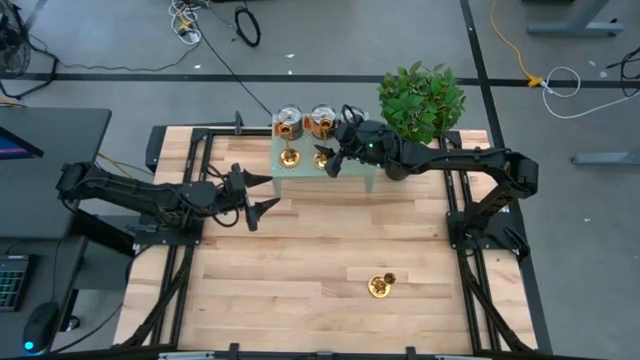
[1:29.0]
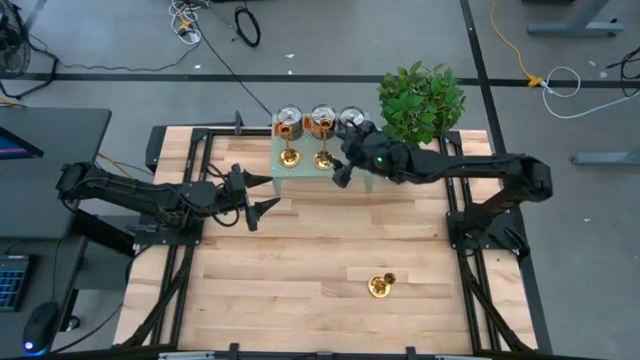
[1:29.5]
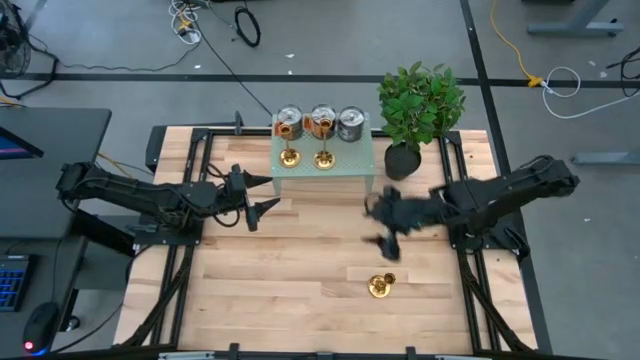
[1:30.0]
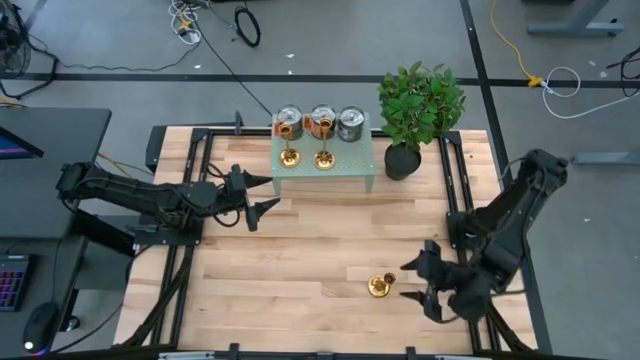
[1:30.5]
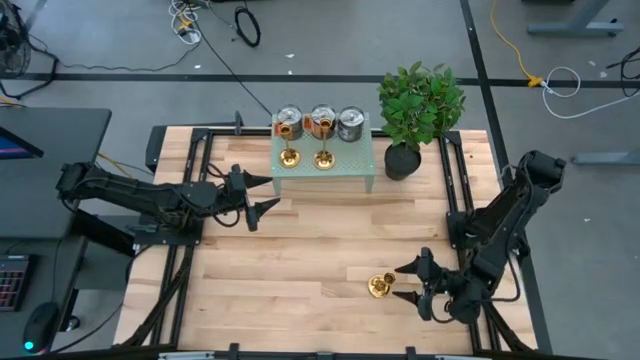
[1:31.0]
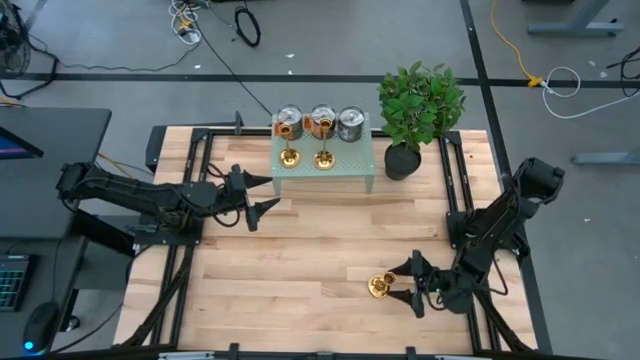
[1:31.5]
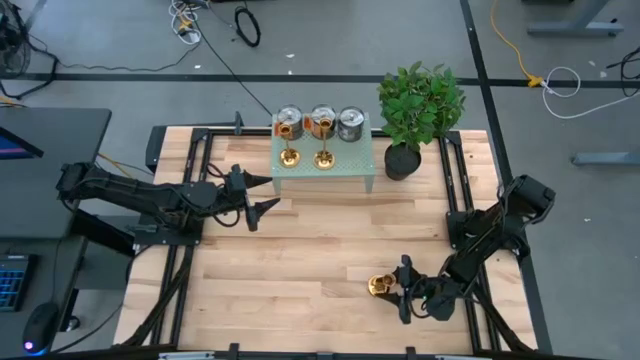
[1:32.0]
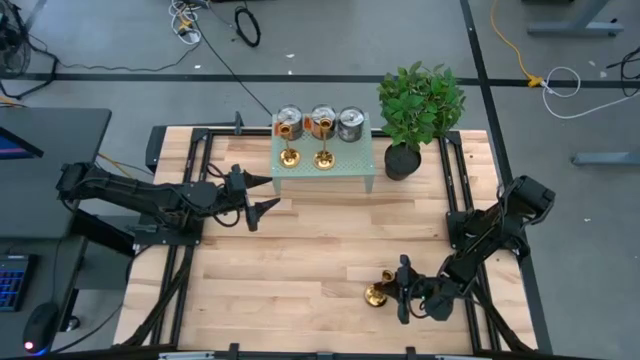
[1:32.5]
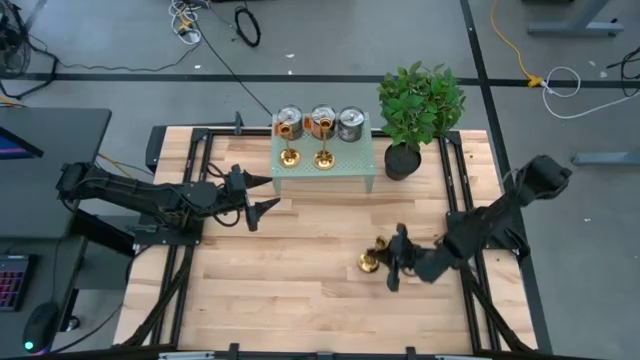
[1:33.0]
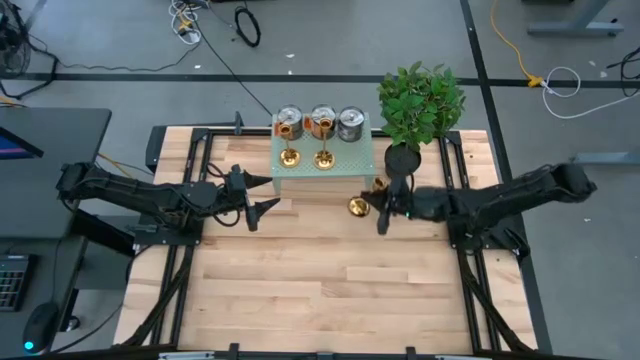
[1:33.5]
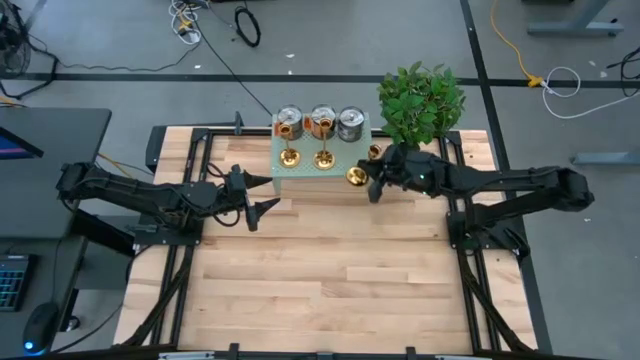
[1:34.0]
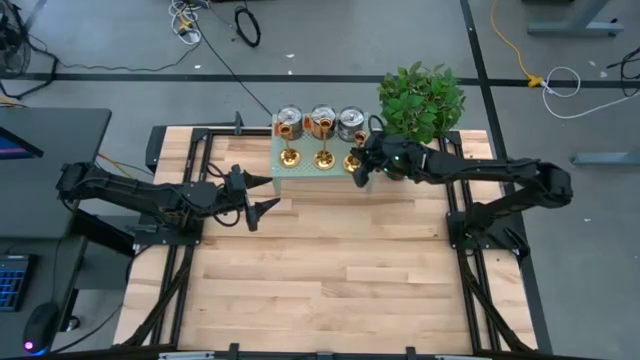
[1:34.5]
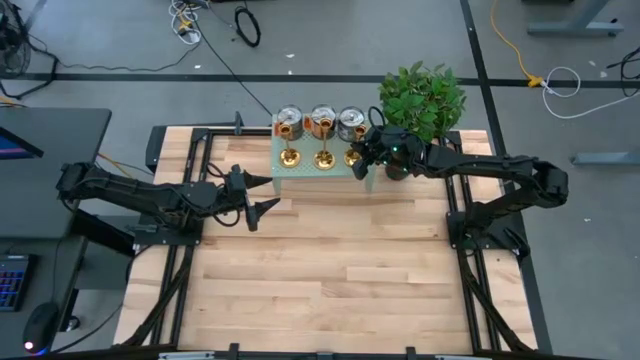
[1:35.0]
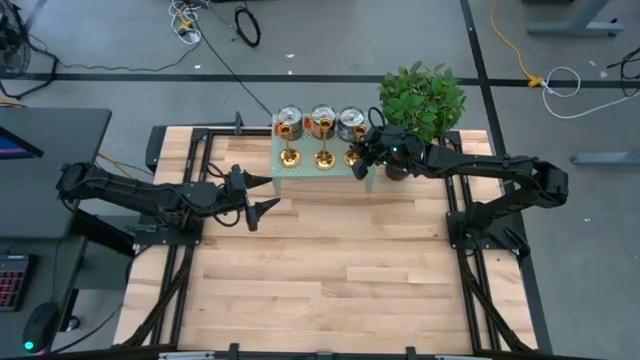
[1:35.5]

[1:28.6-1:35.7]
Task: Pick & Place candle stick holders
Put the gold candle holder on the shelf aligned with the other gold candle holders

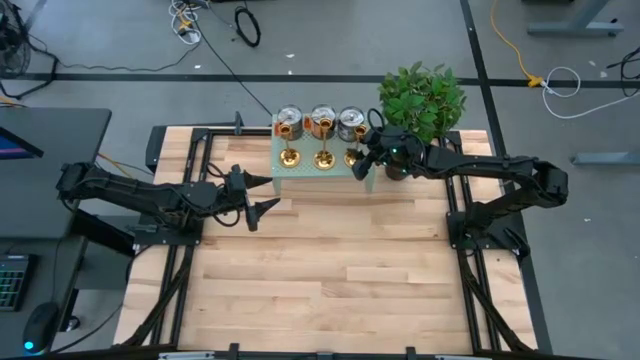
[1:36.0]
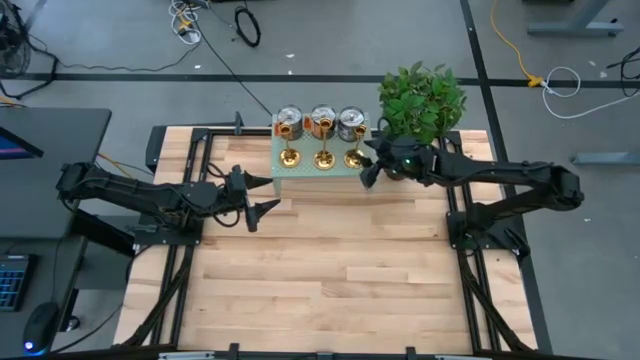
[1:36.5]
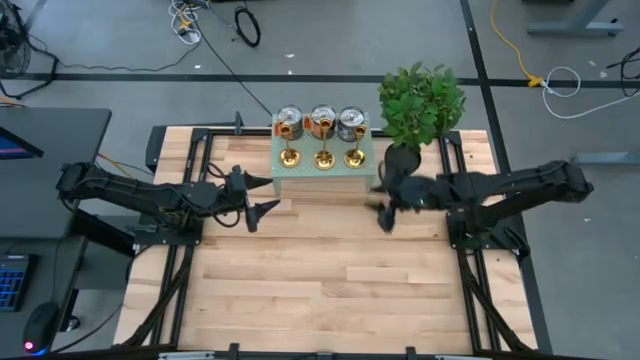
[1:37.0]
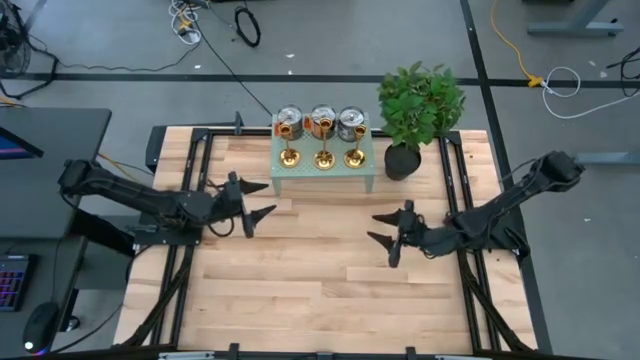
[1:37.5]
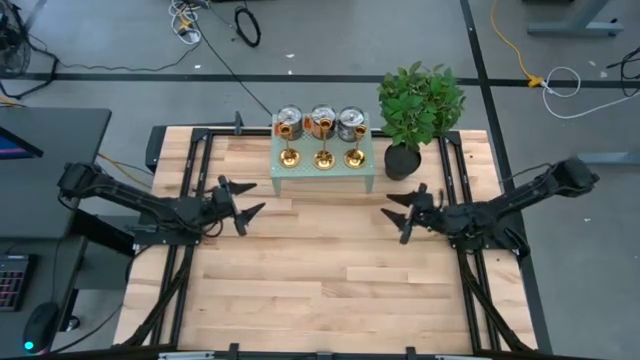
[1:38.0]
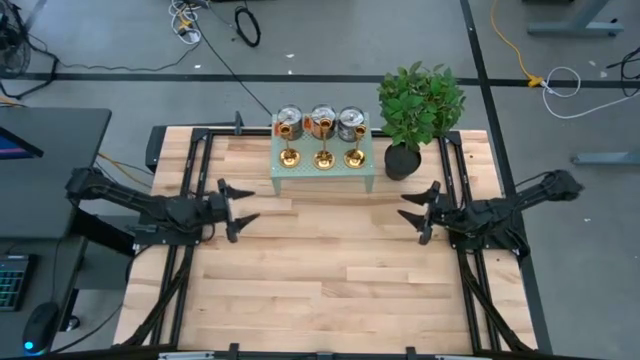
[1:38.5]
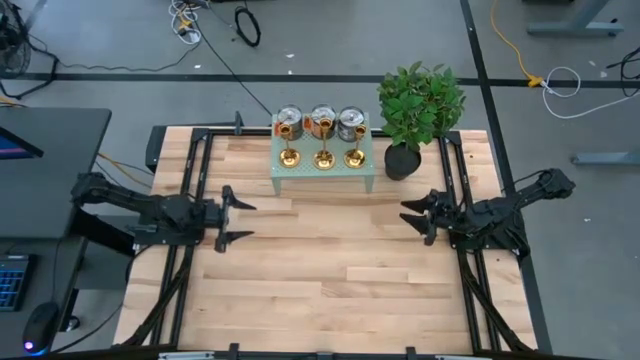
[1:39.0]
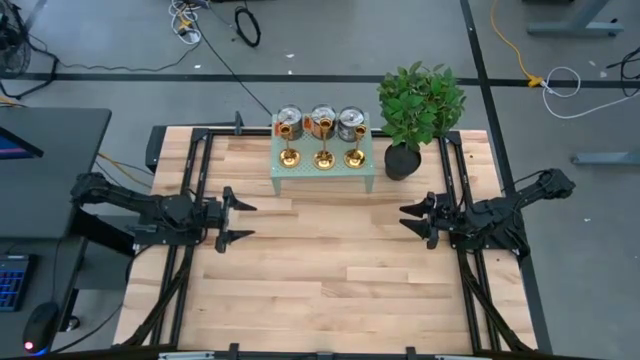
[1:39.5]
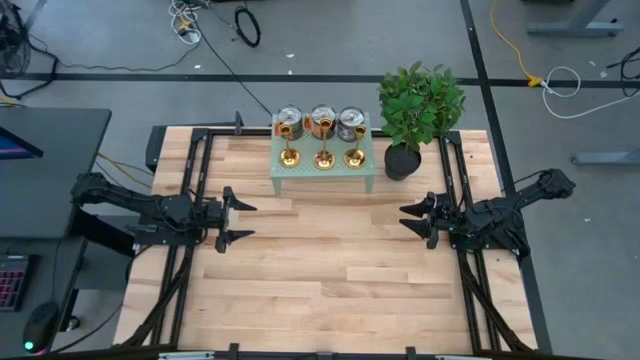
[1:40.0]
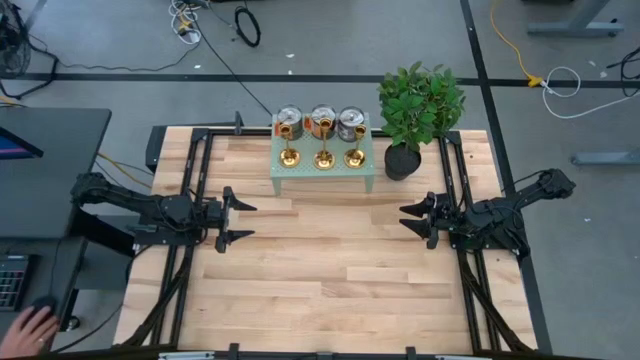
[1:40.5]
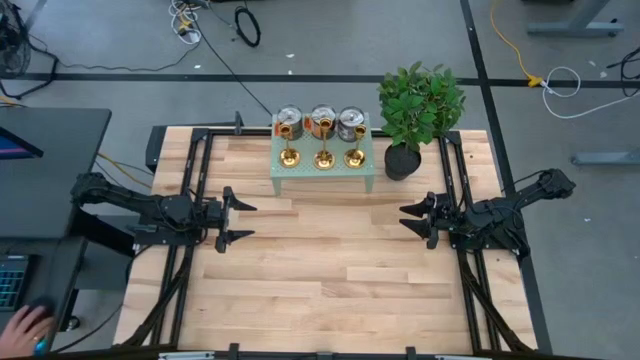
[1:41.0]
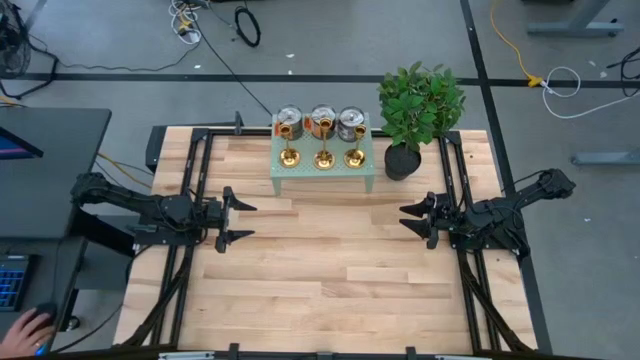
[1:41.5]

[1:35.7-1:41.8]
Return to Home Position

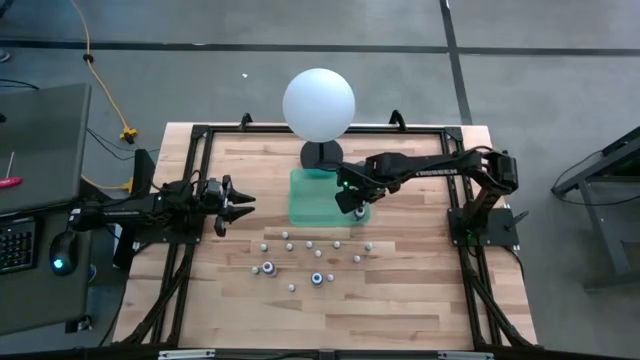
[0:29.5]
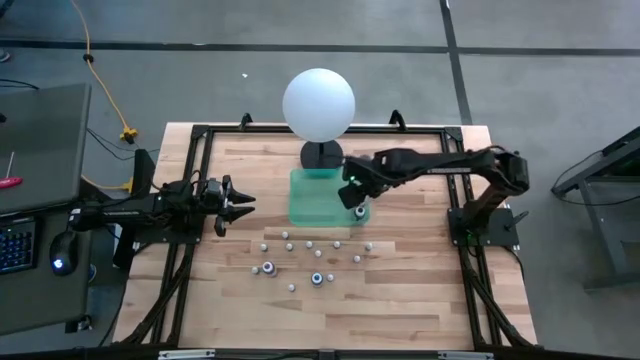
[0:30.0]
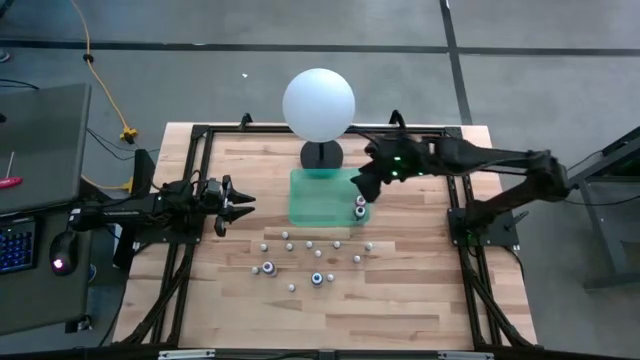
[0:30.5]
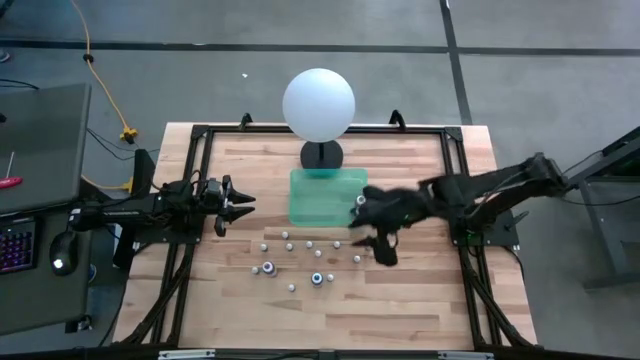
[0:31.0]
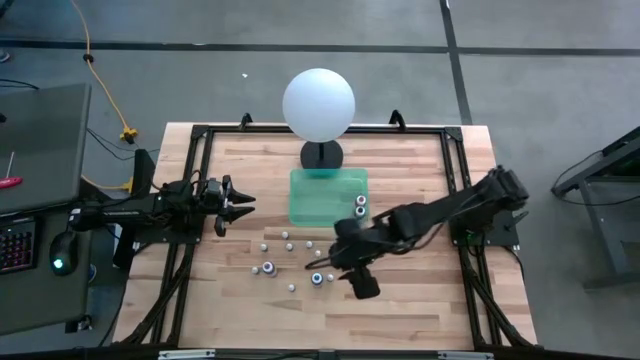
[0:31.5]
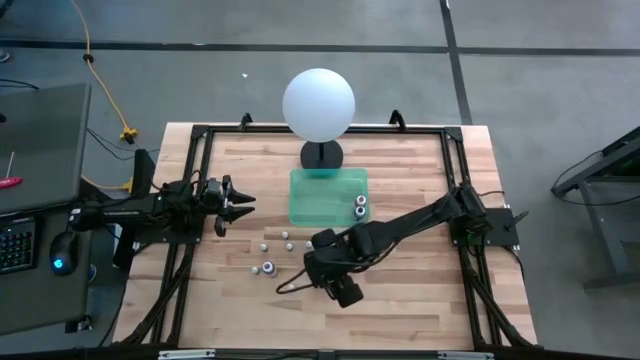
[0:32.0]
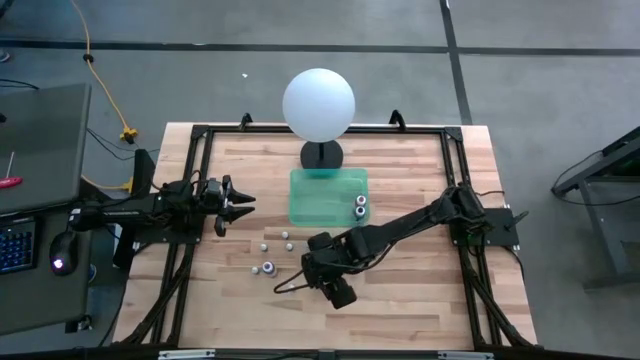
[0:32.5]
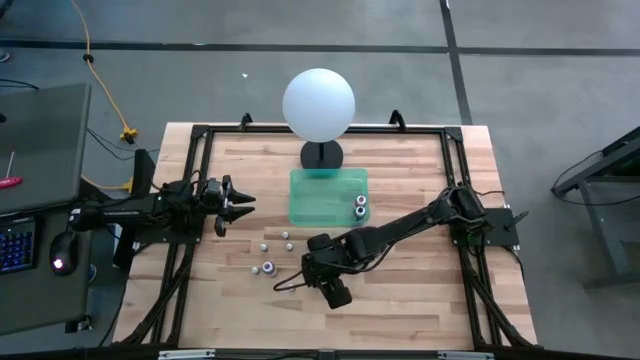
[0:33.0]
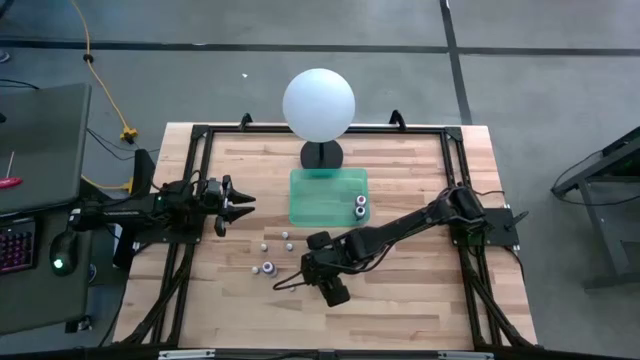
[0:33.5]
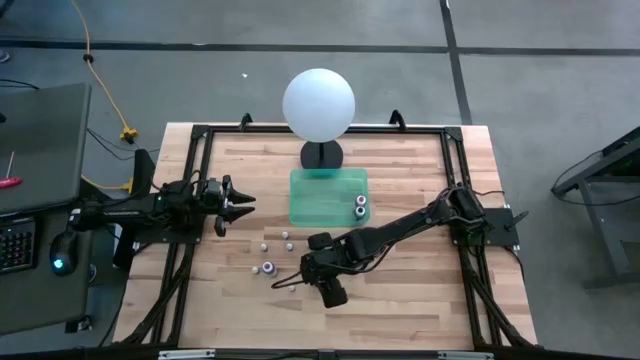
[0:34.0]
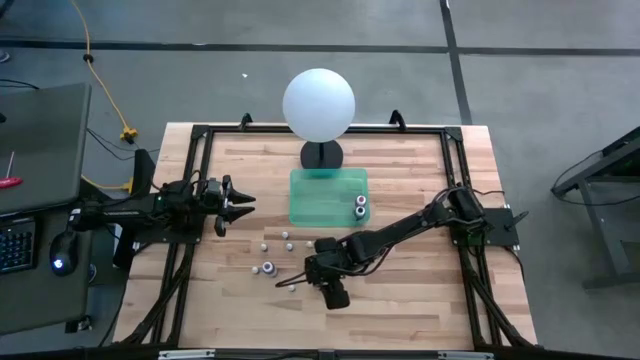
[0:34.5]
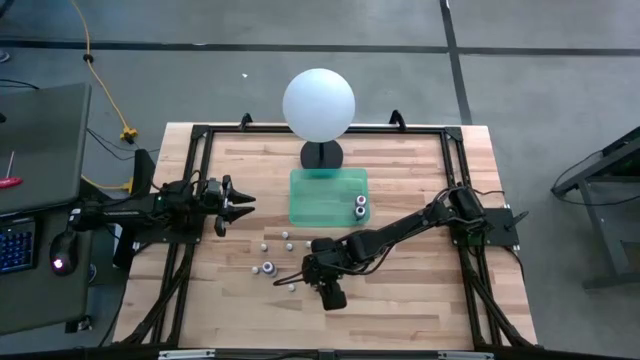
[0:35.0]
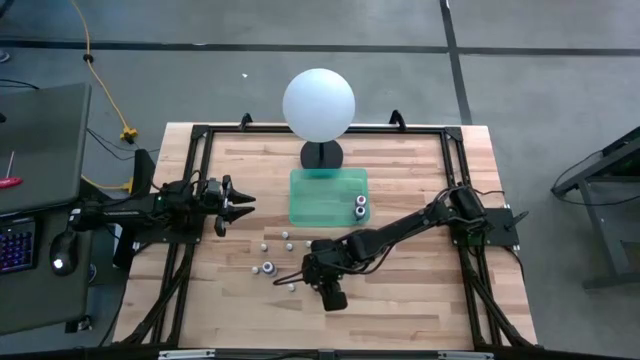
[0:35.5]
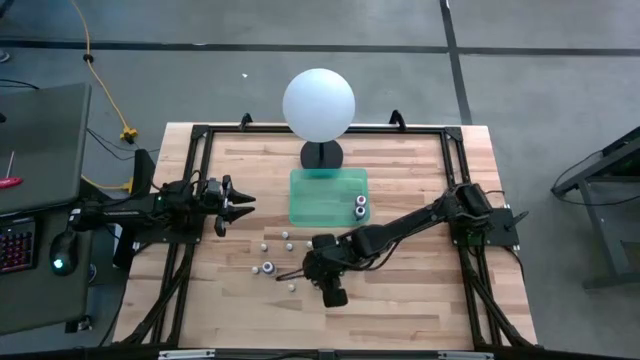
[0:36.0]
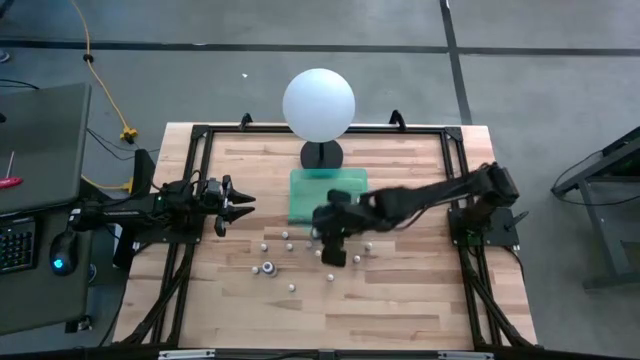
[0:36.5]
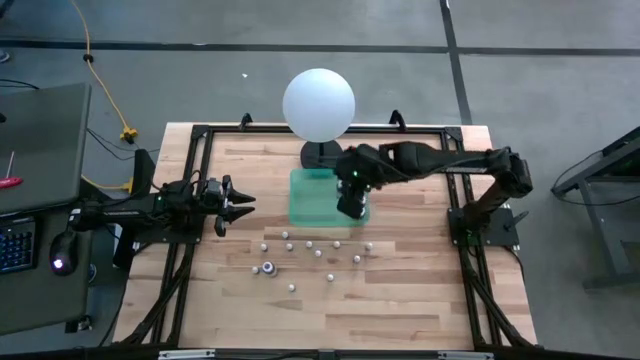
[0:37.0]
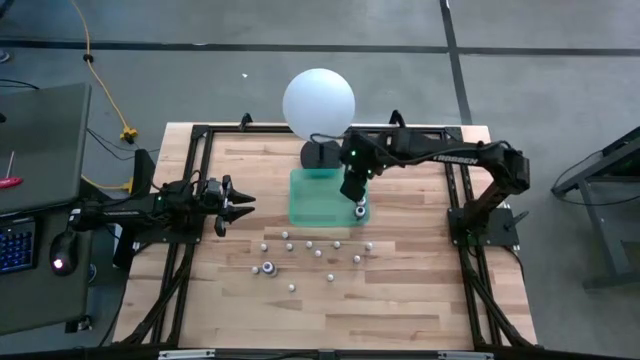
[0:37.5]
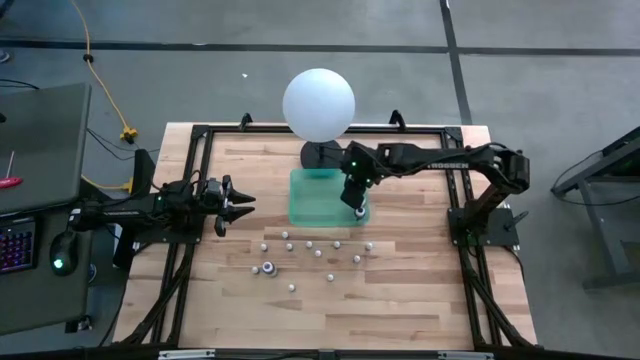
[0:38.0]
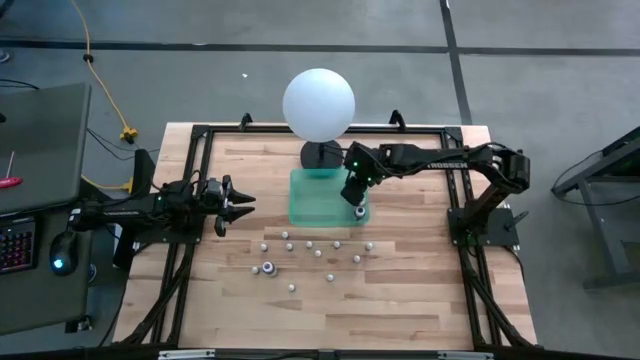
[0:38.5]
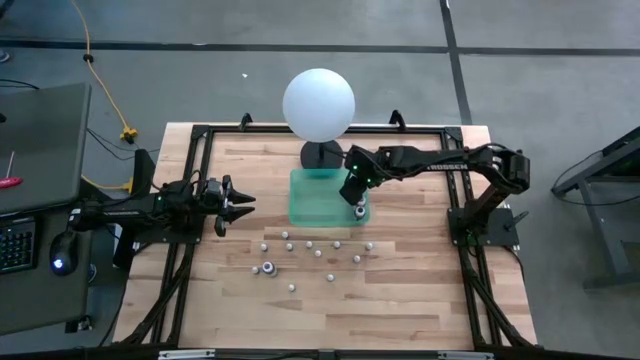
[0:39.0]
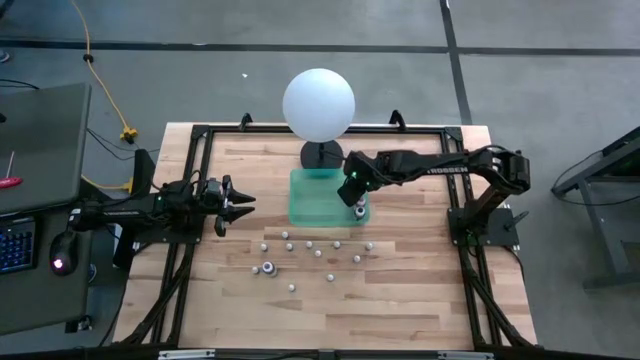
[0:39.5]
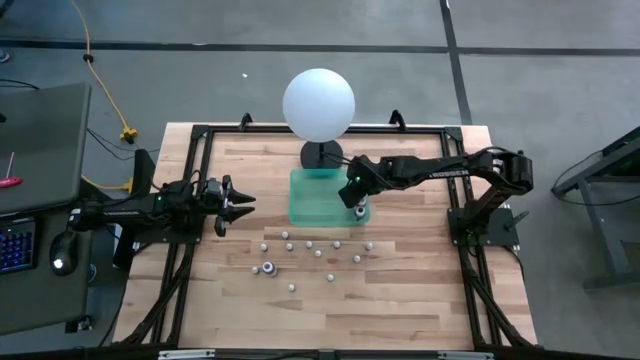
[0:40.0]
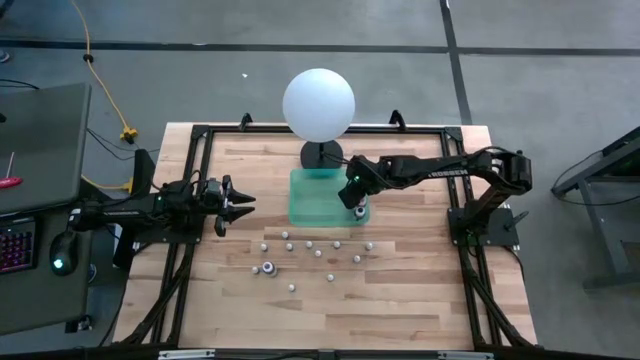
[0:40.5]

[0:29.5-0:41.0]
Task: Pick & Place food coloring
Put the large blue food coloring bottle into the bin
